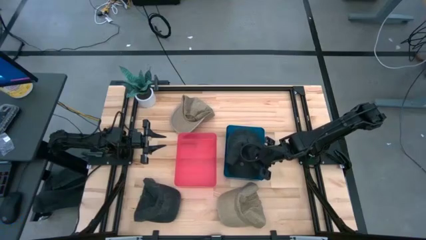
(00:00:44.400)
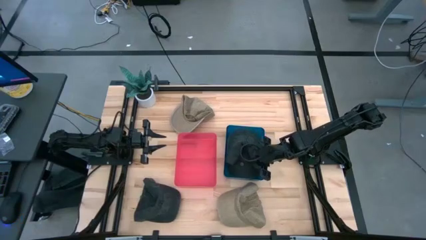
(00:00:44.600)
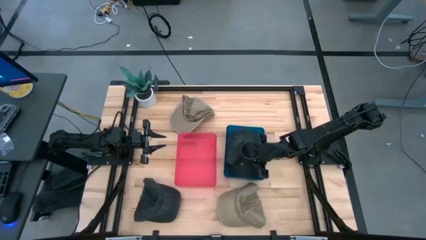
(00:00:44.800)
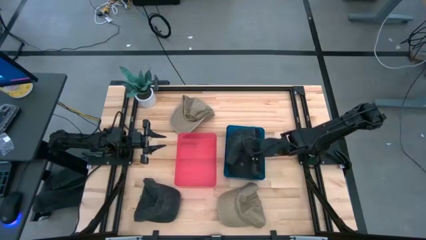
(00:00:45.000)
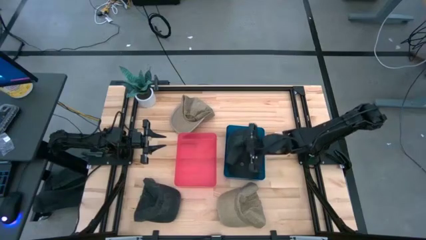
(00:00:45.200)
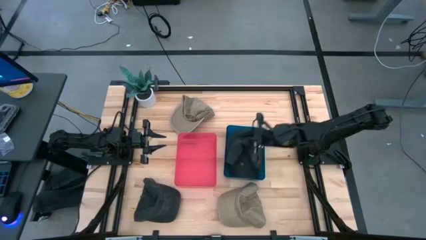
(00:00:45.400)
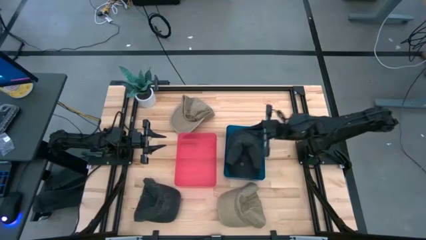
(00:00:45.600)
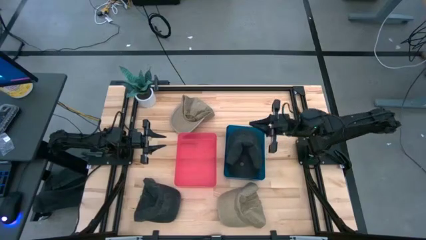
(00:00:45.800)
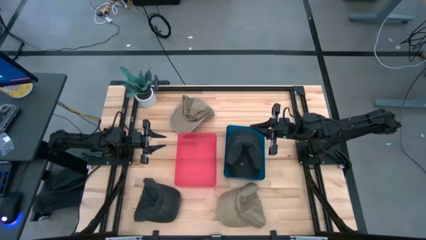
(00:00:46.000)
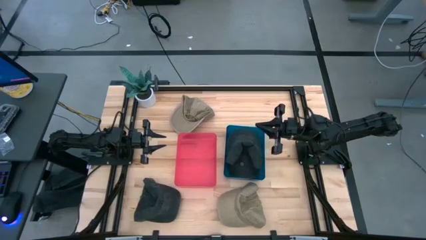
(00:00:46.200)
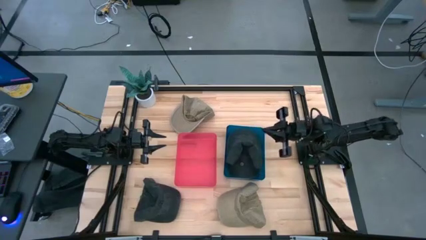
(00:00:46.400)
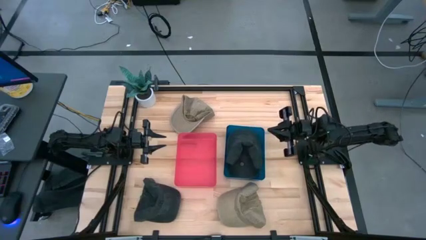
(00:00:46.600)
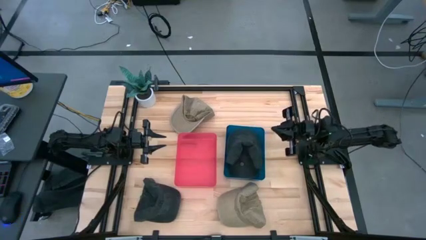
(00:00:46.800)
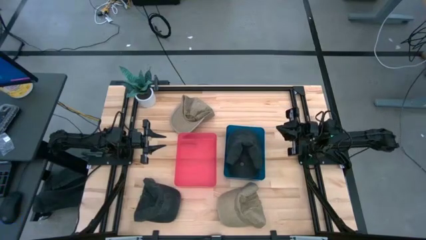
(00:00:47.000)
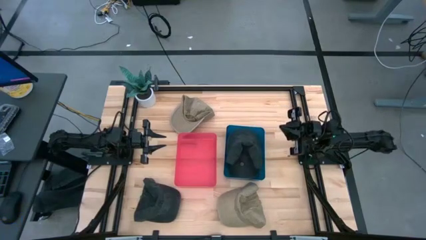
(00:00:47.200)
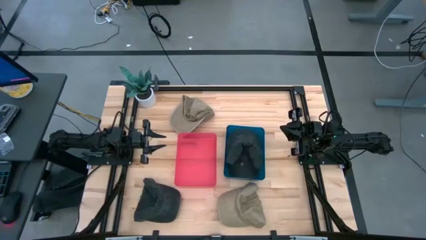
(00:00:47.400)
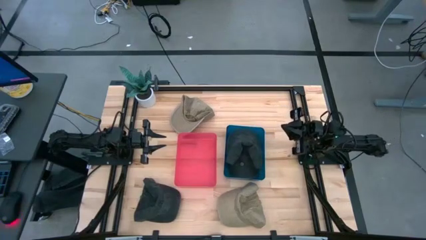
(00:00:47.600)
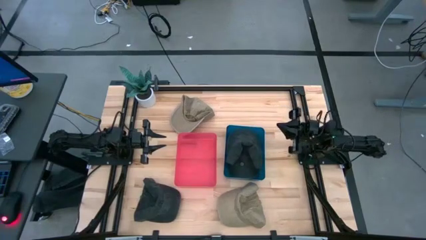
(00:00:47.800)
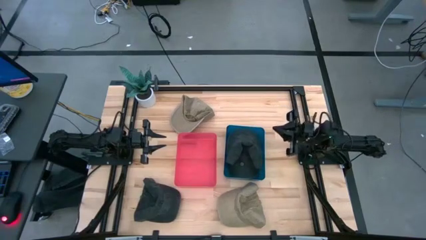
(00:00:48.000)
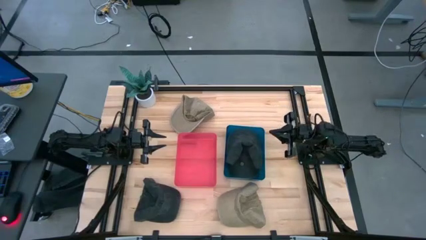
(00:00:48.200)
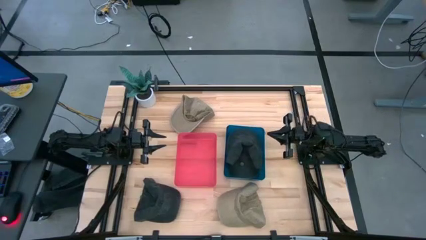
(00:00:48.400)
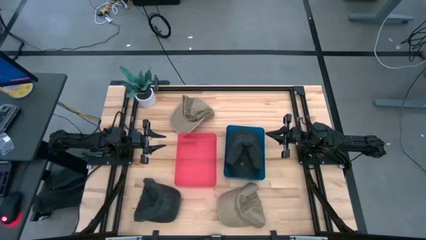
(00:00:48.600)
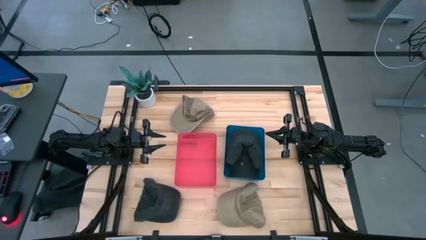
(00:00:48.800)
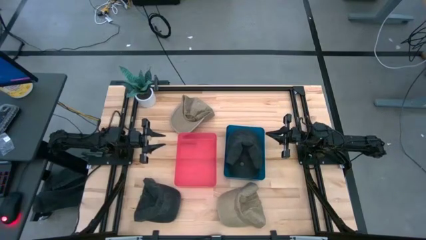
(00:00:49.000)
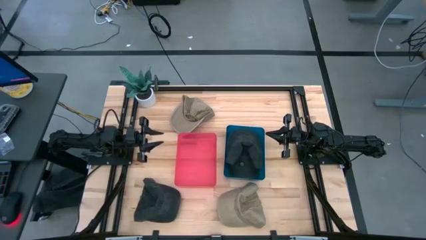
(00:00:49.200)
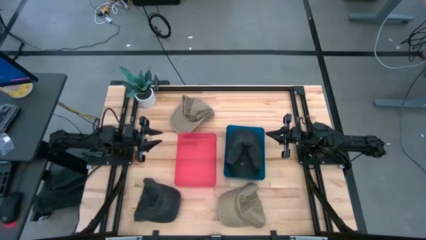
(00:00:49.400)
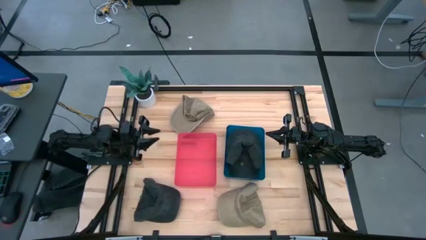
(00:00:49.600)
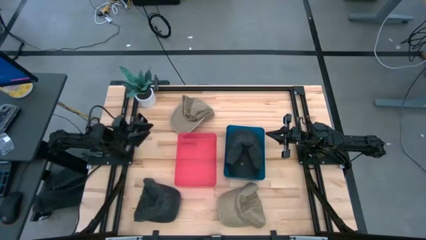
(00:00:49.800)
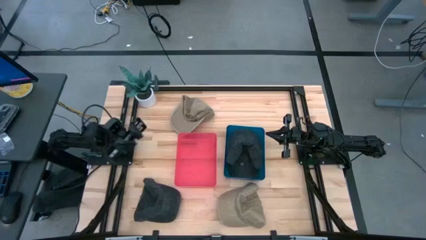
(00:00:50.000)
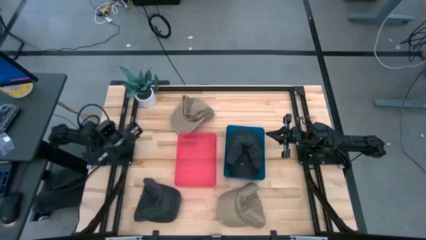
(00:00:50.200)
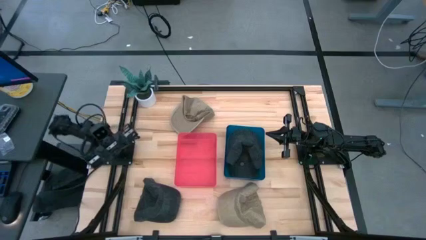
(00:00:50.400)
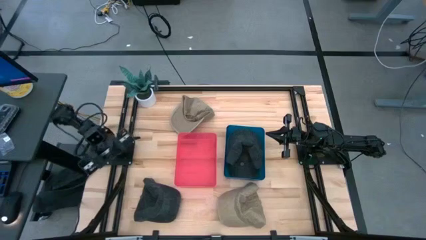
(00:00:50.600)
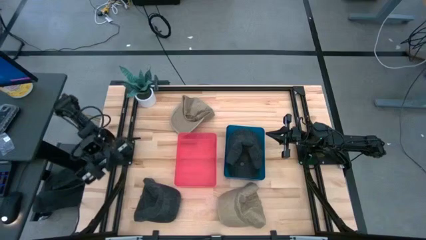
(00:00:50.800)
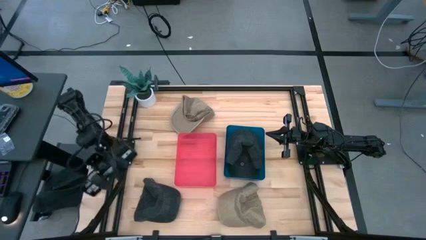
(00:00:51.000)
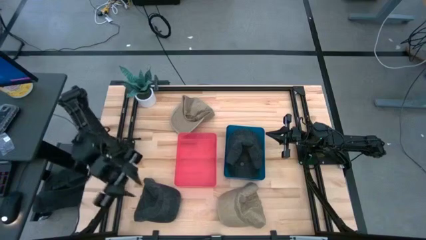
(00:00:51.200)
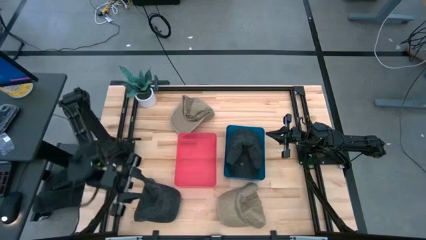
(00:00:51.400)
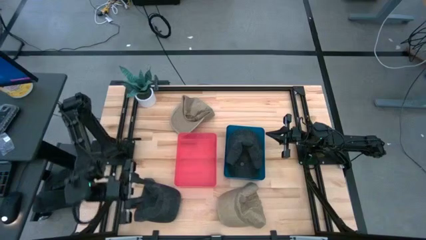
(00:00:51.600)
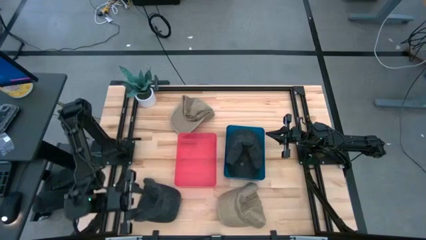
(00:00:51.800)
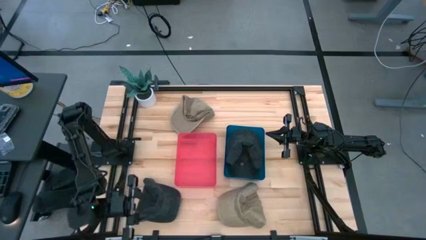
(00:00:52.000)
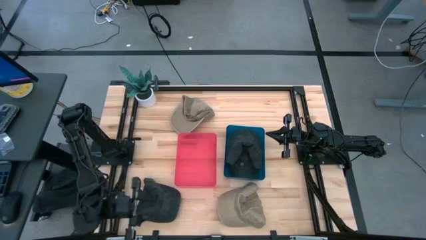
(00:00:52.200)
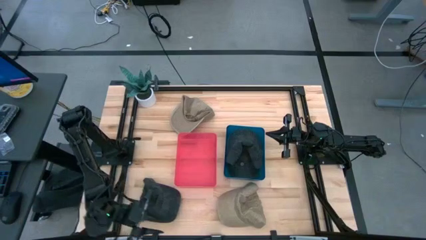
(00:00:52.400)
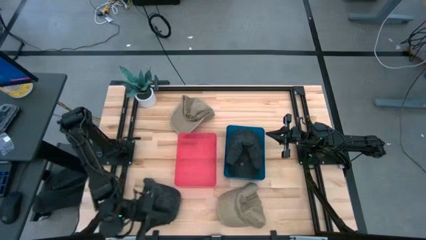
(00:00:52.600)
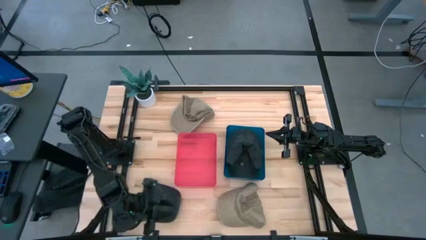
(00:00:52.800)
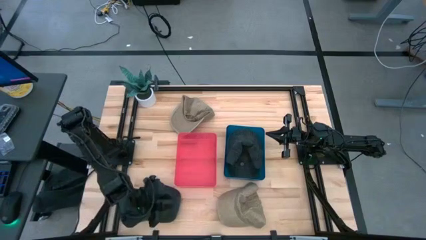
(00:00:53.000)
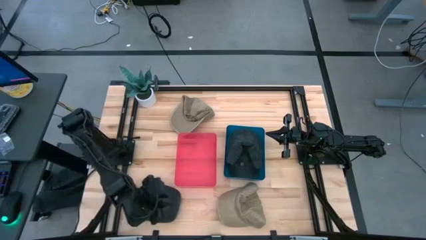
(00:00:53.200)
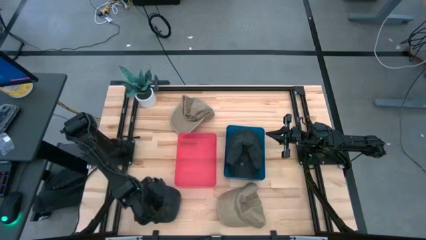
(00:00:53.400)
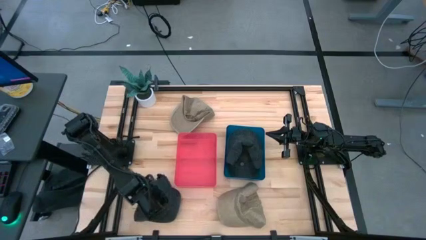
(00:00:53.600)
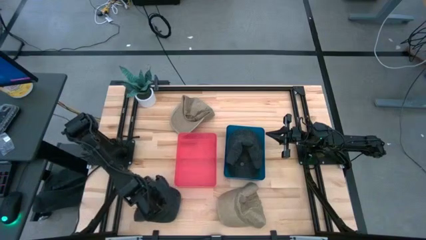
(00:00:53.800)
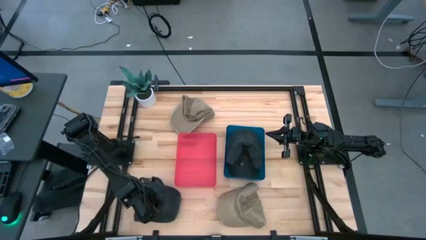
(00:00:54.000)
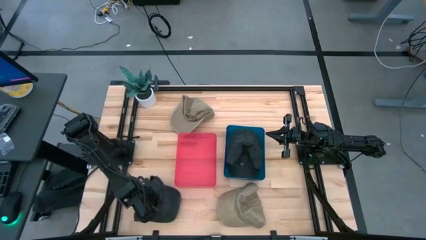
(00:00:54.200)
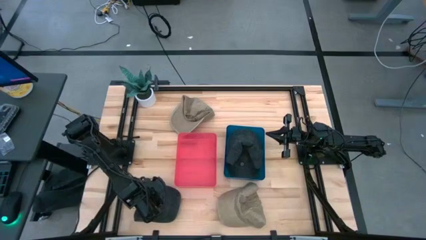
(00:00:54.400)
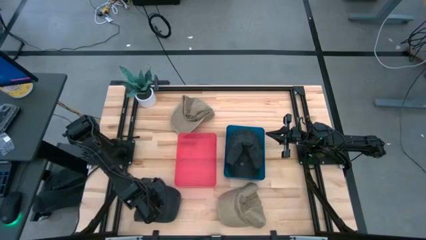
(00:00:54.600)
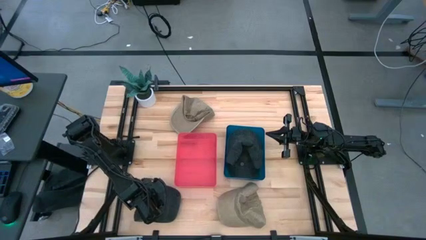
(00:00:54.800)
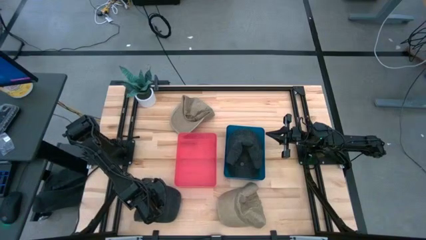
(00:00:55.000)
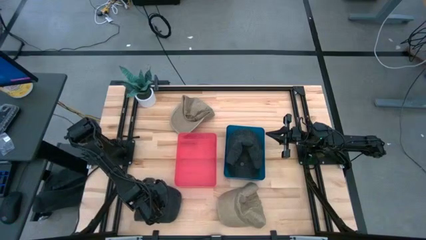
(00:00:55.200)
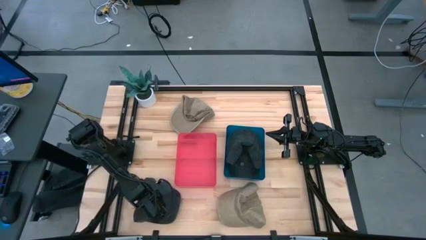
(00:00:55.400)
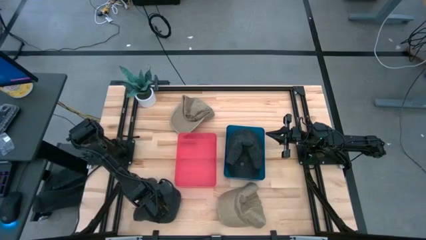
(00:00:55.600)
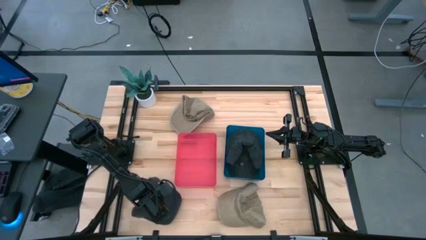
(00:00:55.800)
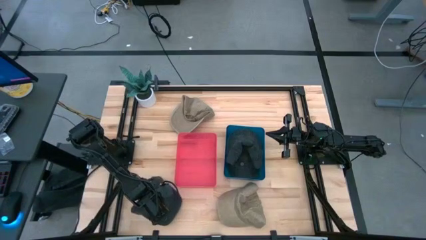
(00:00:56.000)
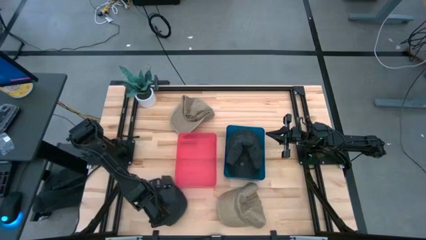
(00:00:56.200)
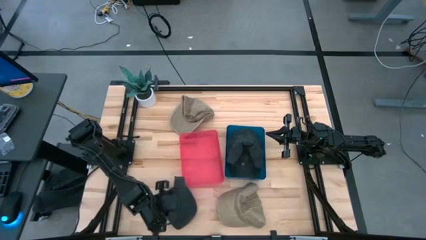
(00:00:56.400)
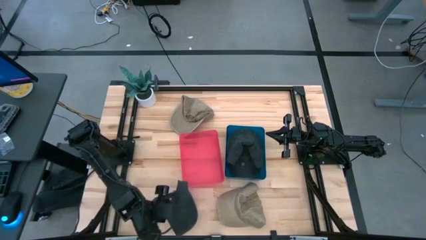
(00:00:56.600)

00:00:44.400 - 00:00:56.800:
Task: Pick & Place hat
Put the black cap into the blue bin
